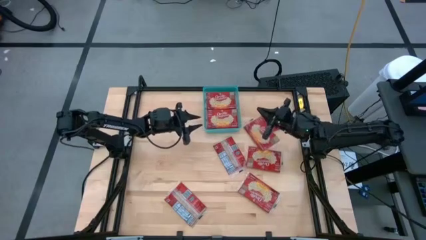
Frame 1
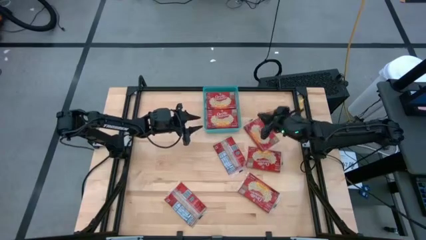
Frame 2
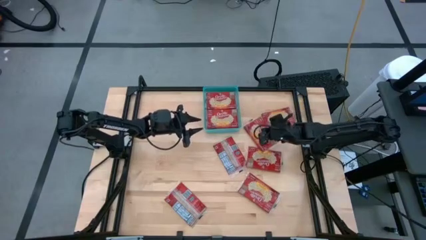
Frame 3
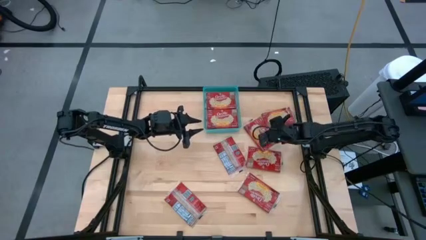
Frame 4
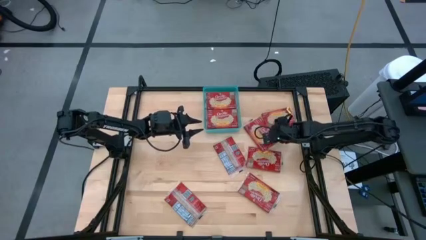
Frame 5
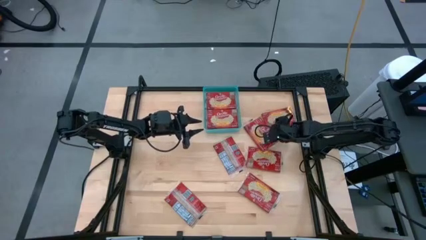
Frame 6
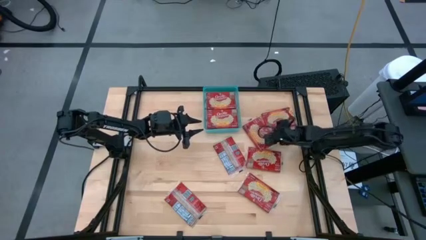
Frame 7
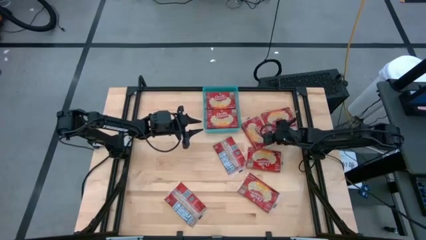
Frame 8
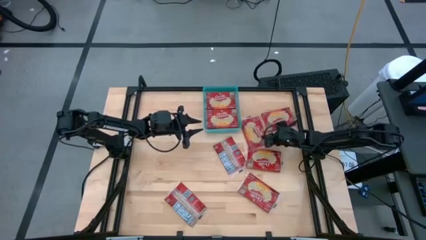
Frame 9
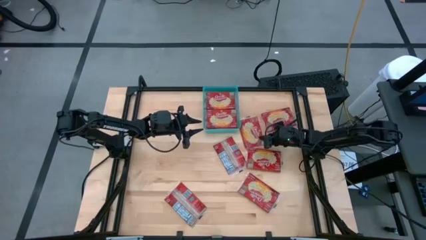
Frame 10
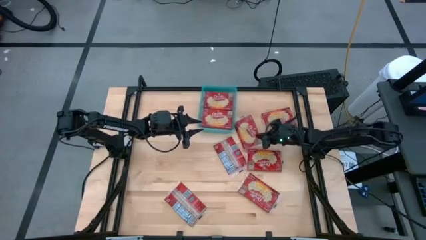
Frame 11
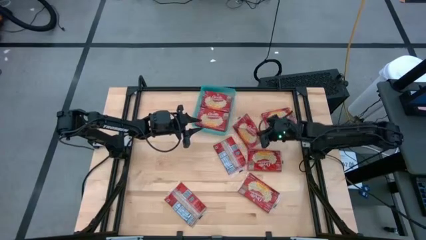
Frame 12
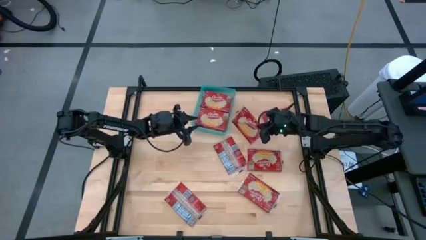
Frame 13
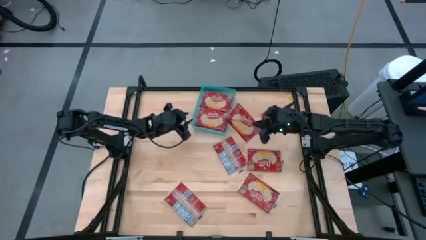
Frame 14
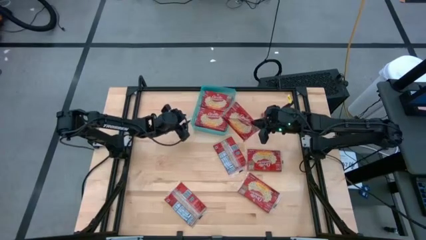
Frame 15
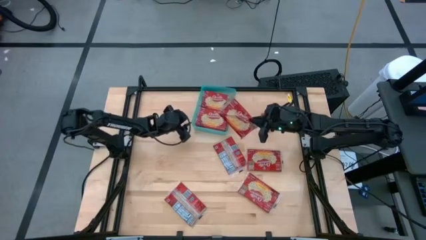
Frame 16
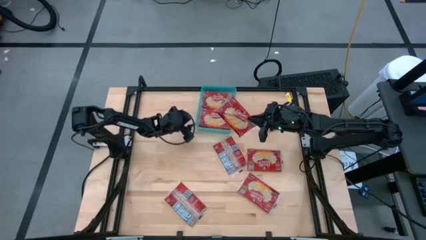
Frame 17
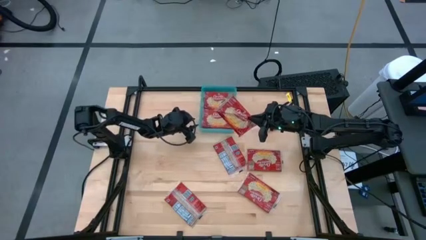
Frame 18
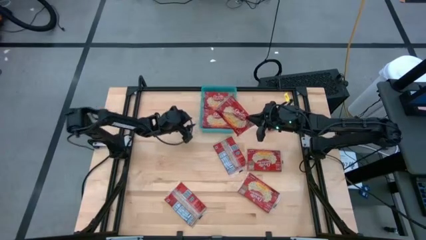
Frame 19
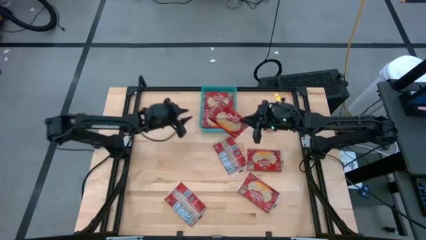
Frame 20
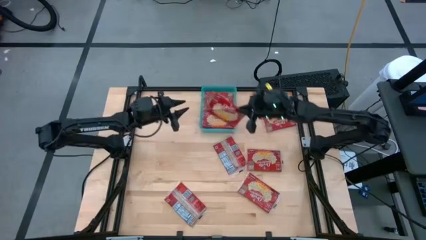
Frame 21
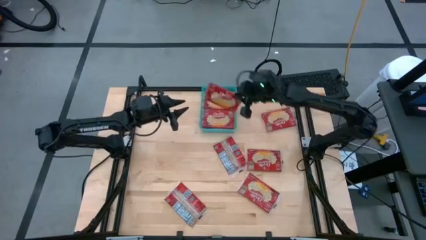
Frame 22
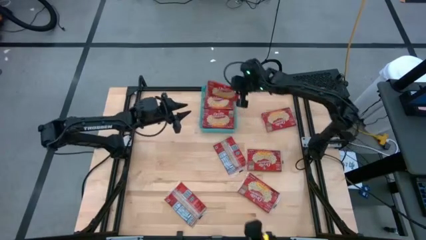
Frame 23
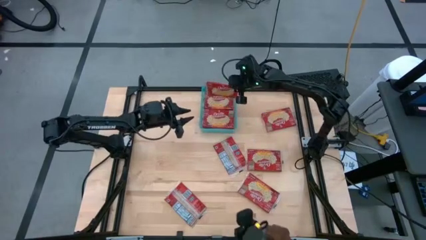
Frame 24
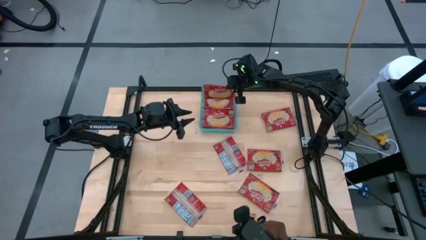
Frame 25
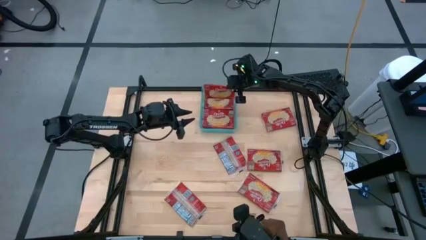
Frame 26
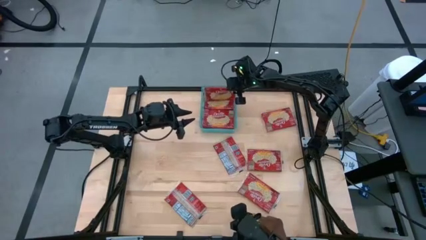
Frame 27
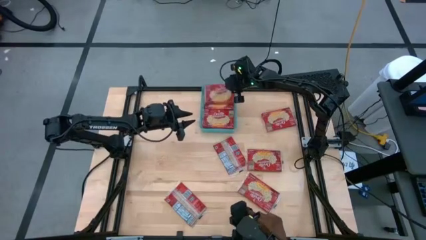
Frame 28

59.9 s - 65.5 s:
Task: Sort popcorn bags into baskets
Put the red popcorn bag into the blue bin

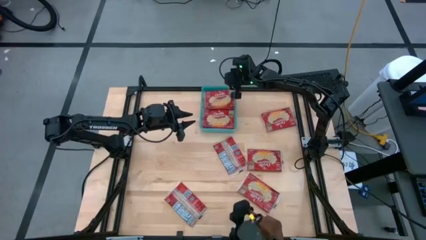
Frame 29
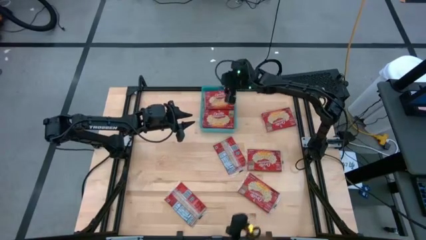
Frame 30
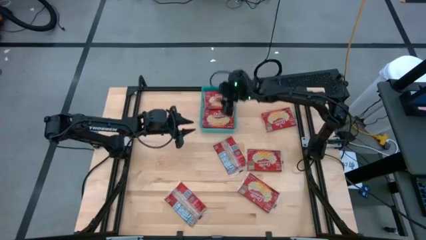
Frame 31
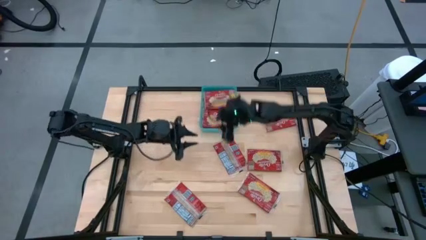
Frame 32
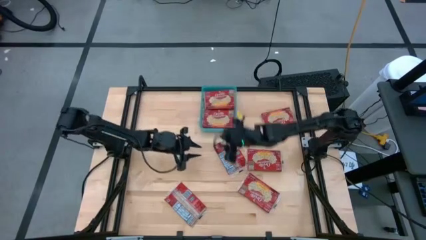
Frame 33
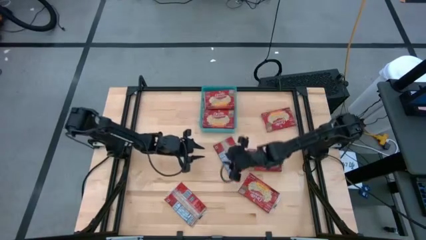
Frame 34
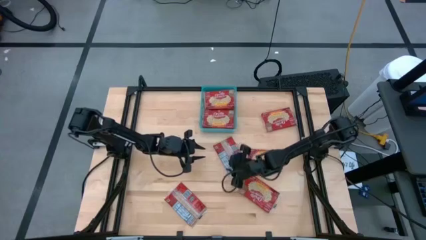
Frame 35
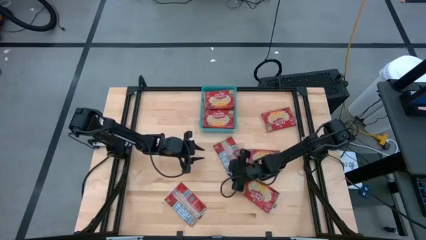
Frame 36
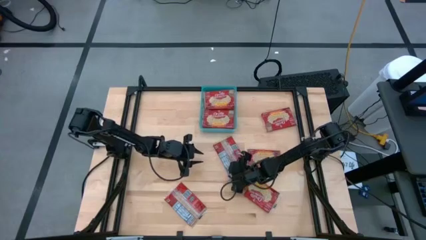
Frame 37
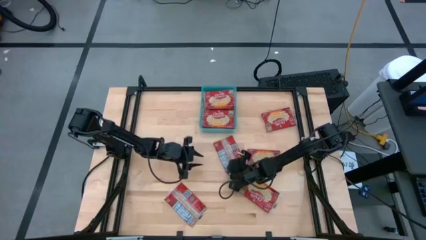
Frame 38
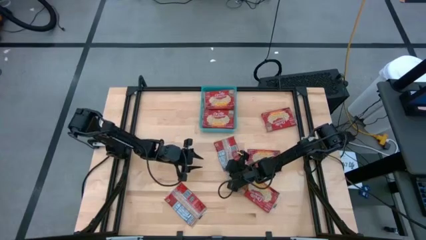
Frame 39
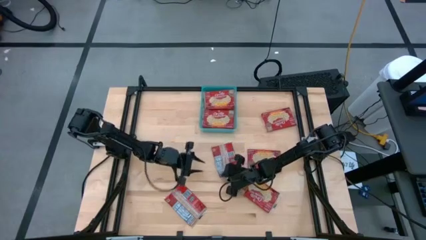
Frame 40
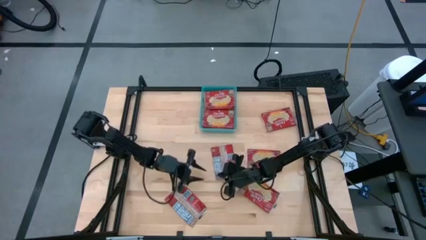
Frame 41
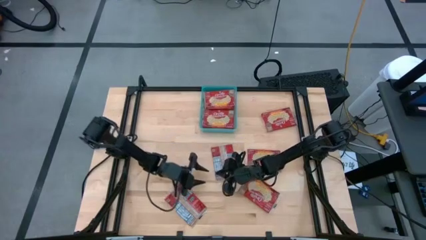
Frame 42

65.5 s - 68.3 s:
Put the red popcorn bag into the blue bin

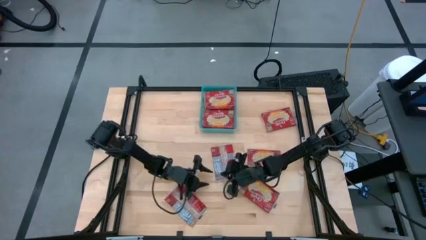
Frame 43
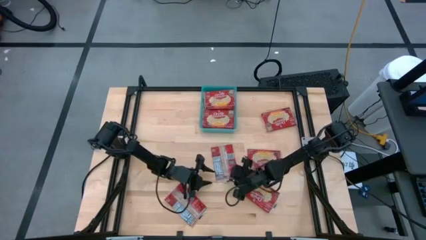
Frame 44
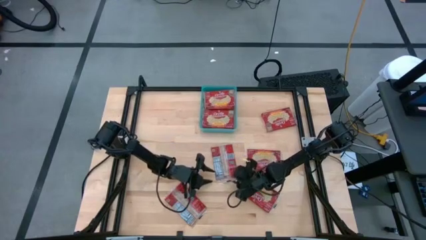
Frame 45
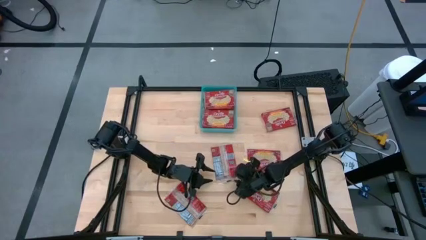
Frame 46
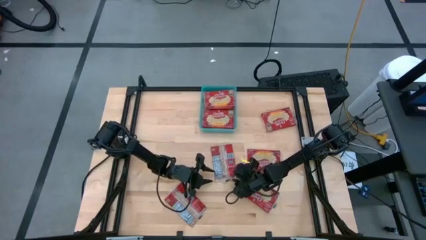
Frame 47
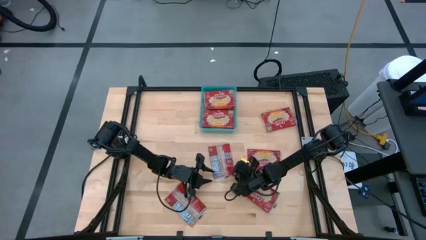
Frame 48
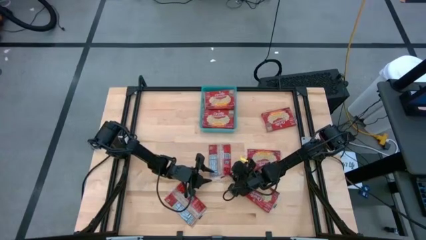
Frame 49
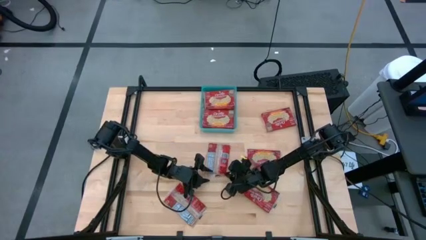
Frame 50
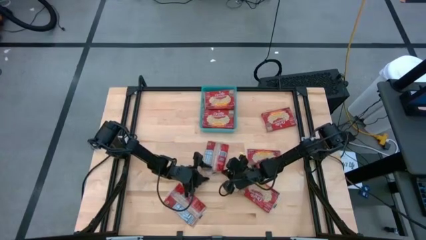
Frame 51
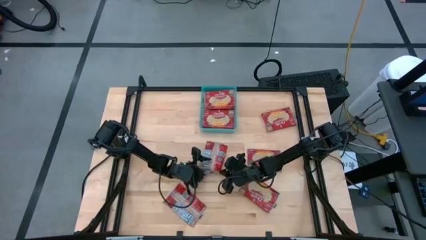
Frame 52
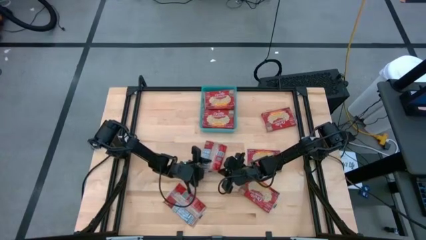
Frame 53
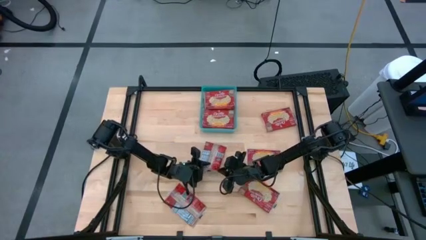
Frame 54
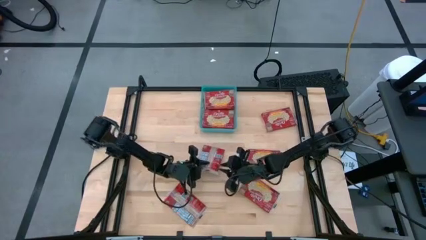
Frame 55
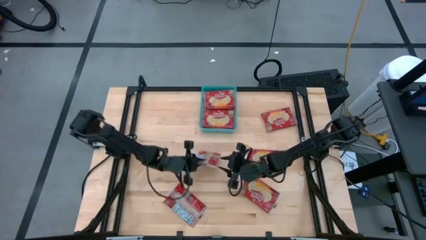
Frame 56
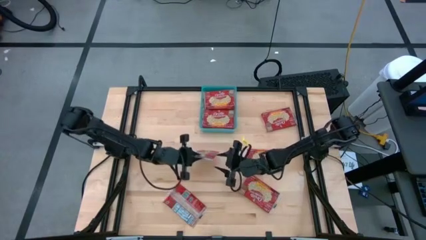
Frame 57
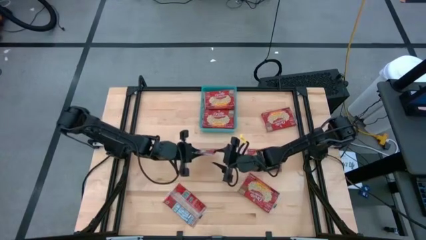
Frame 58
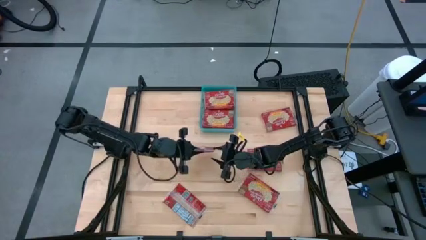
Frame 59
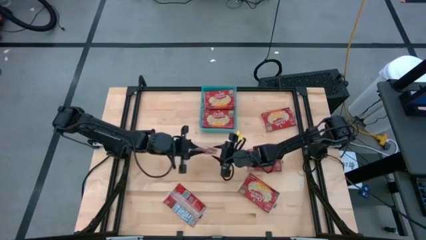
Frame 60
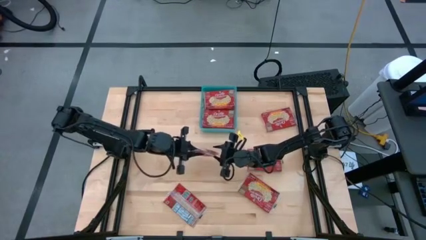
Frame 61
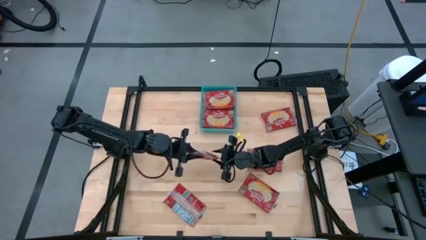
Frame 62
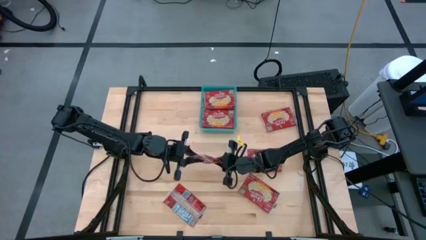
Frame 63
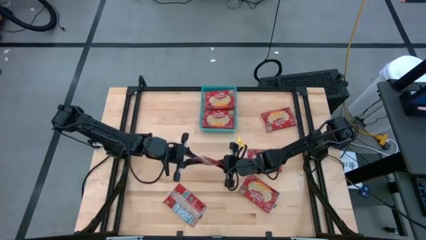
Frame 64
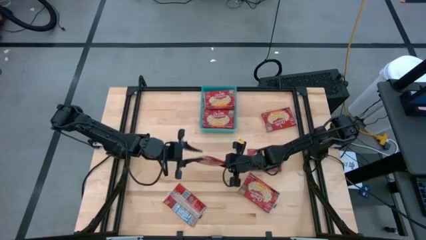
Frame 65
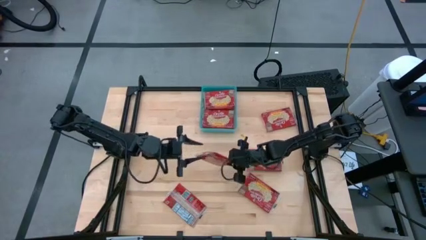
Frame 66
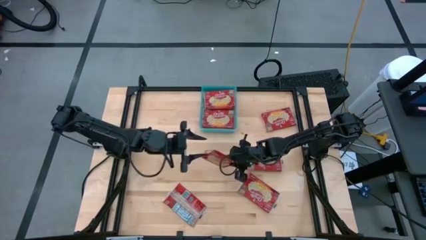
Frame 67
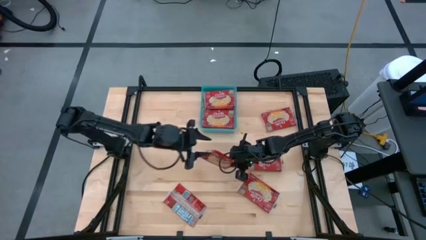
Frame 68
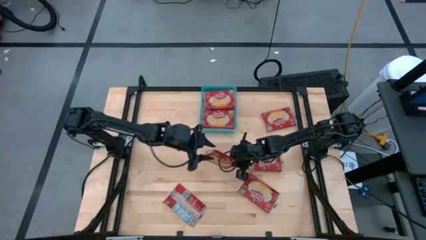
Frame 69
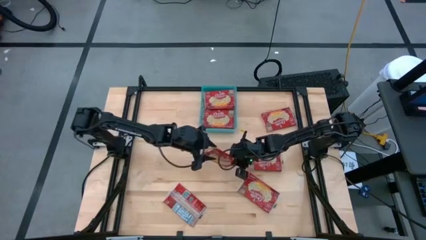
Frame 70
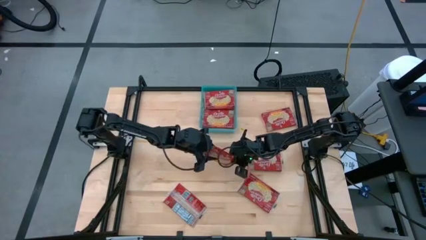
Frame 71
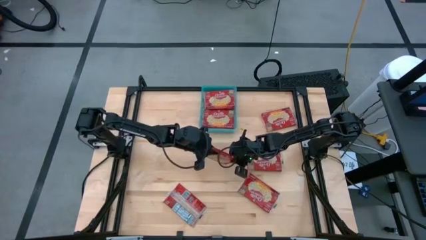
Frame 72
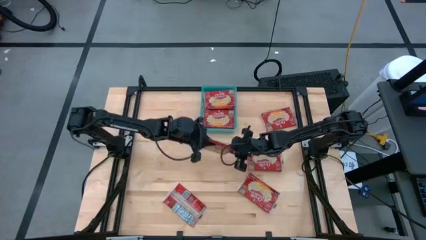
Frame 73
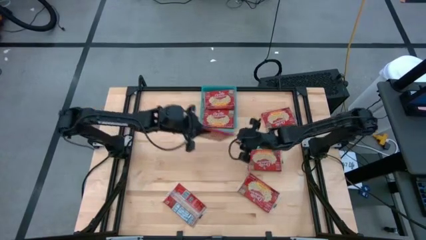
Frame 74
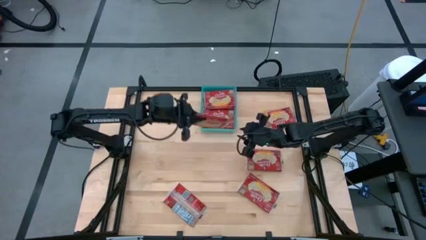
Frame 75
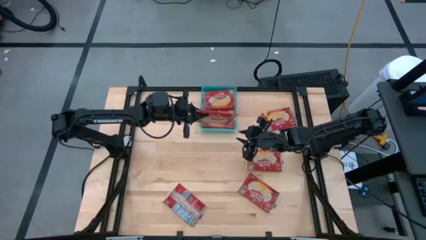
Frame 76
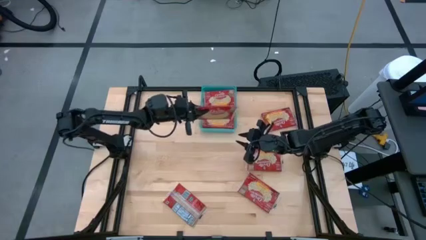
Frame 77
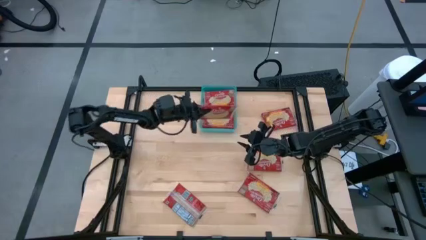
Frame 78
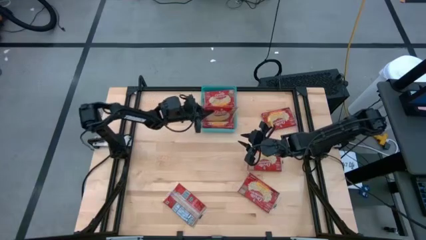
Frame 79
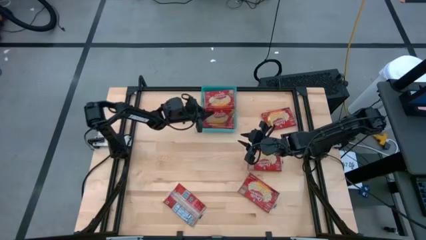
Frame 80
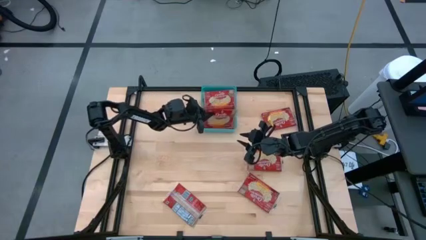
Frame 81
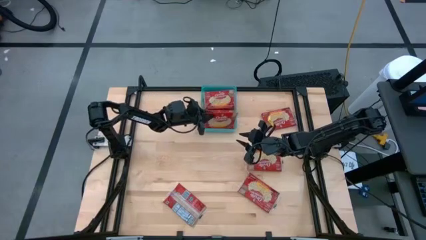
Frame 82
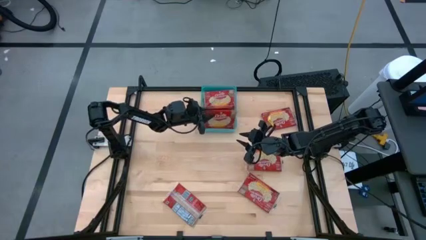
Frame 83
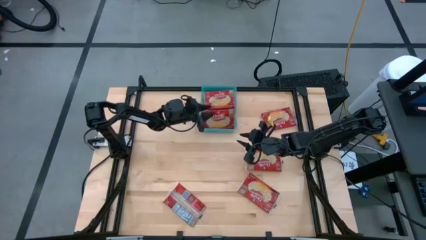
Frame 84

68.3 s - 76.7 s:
Put the red popcorn bag into the blue bin
